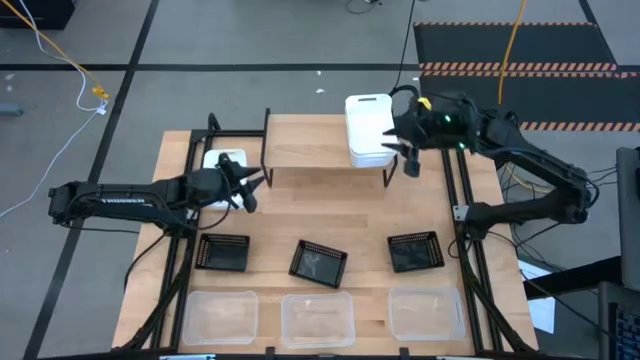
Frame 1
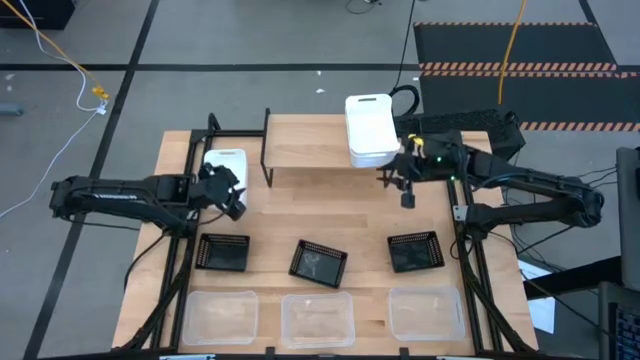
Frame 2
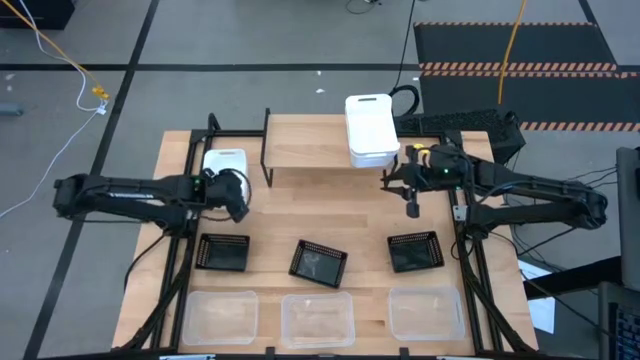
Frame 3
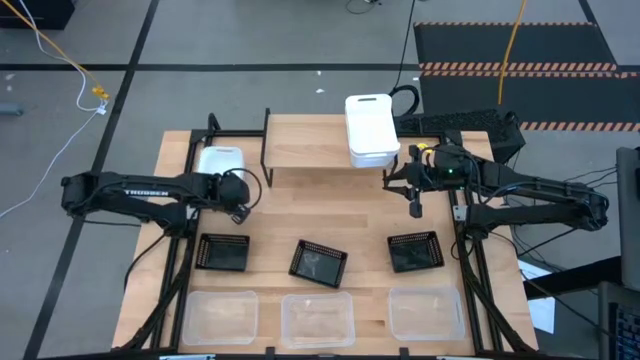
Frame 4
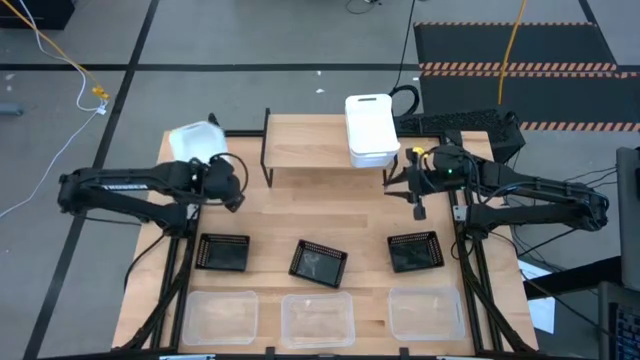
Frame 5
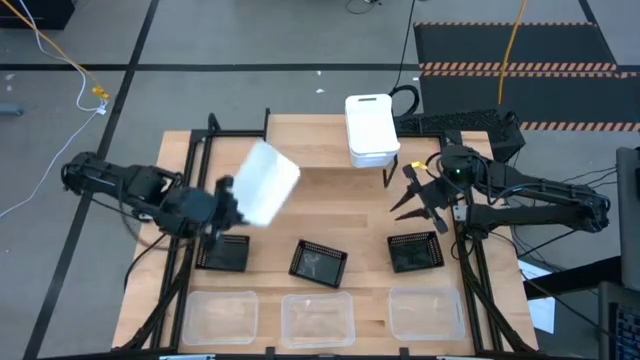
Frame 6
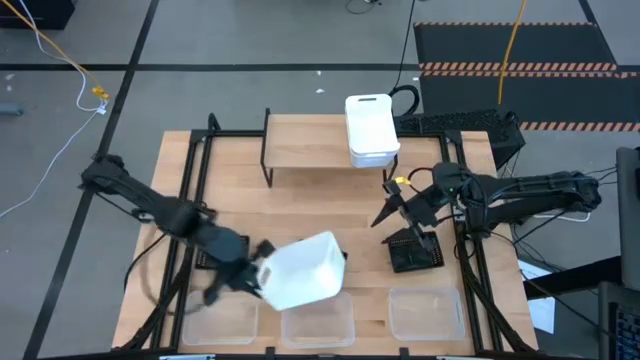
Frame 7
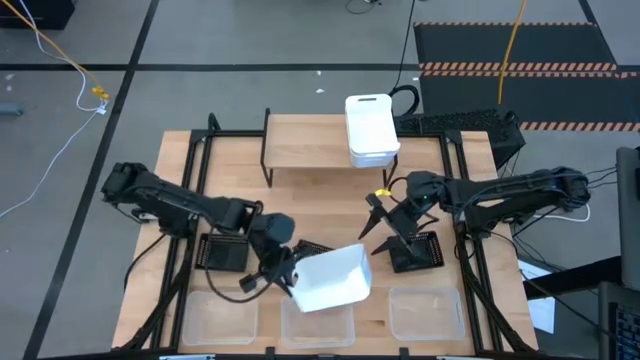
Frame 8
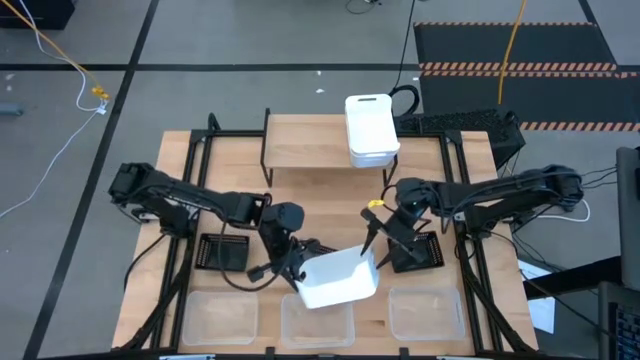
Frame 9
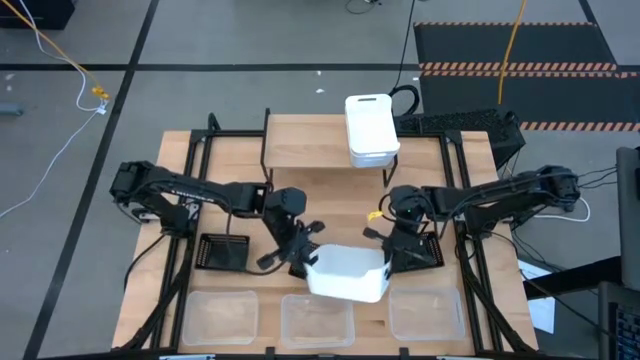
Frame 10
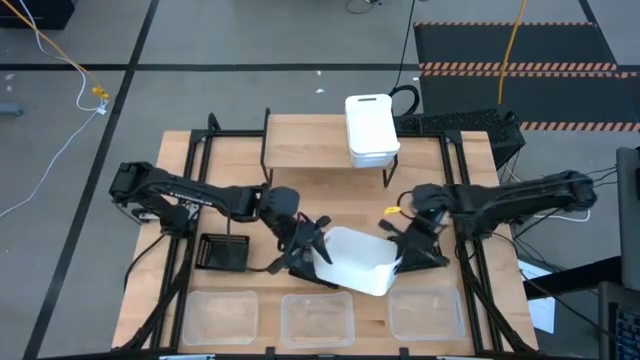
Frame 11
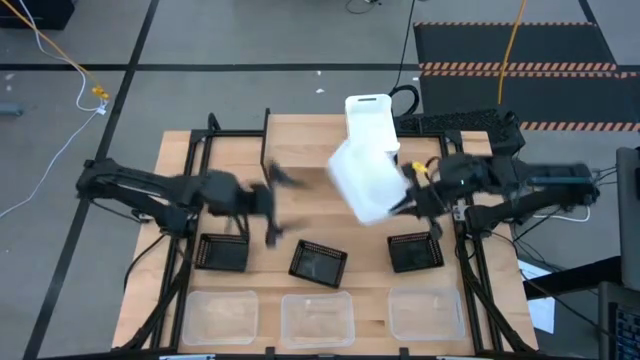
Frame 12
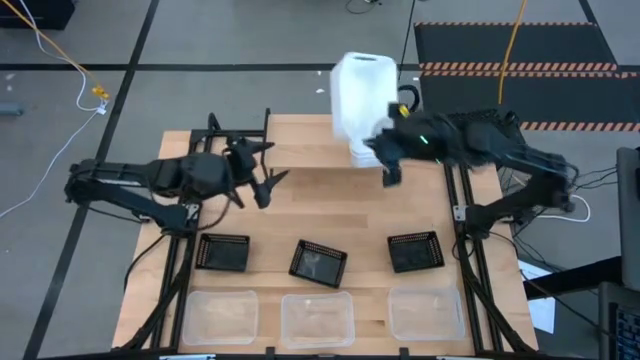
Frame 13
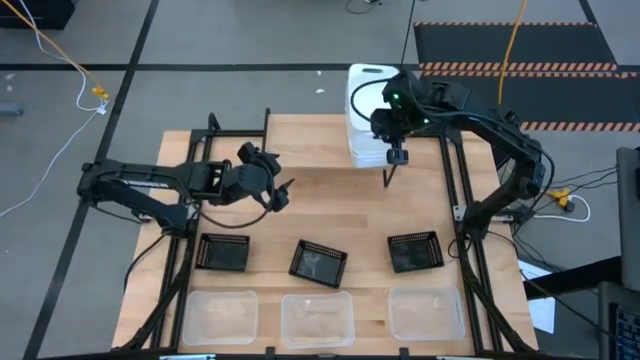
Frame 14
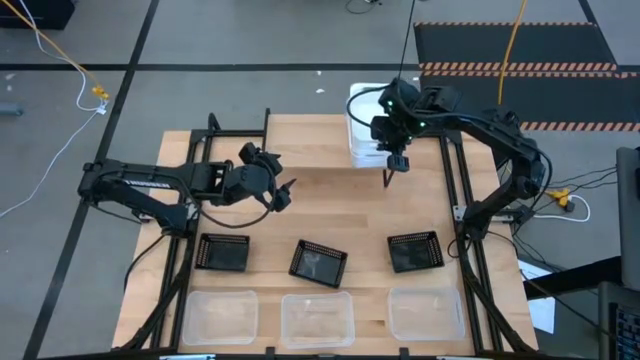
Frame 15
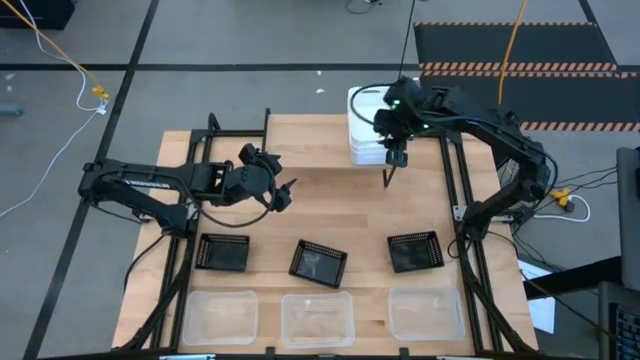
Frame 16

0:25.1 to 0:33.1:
Task: Stack baskets on shelf by color
Stack the white bin on top of the white bins on the shelf

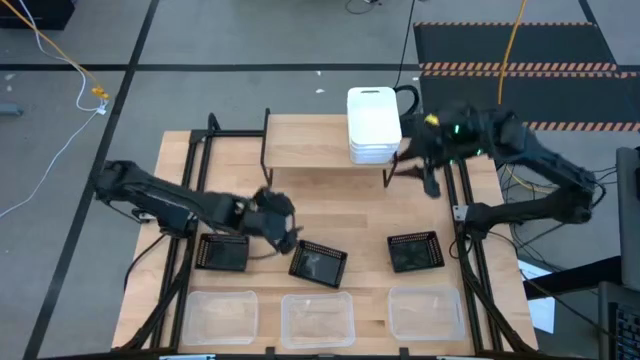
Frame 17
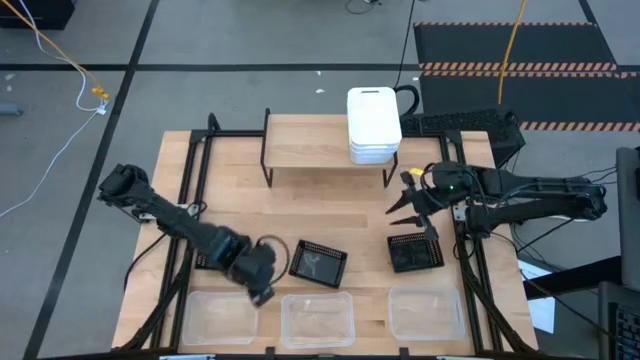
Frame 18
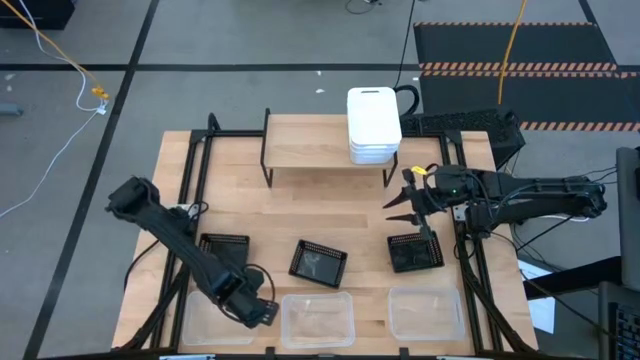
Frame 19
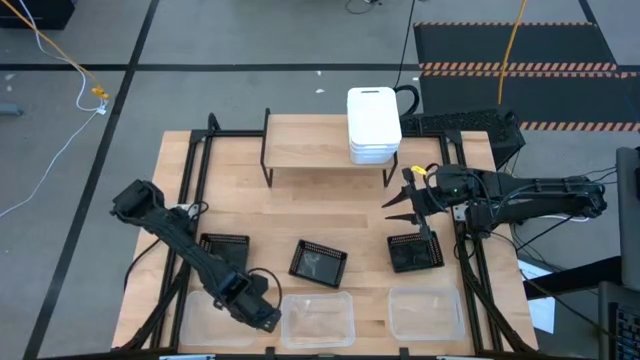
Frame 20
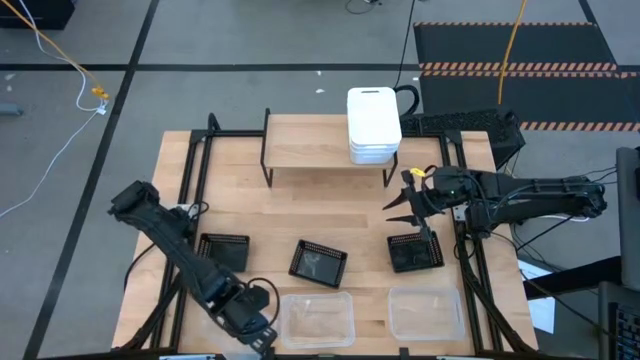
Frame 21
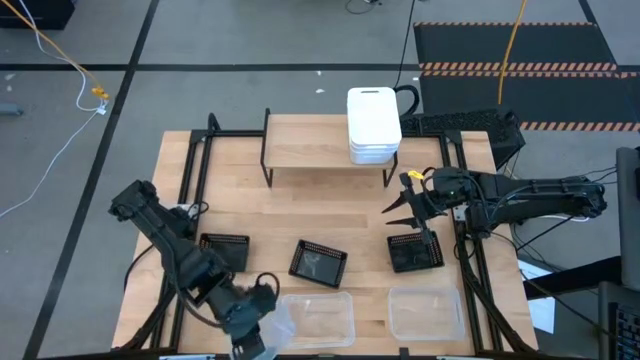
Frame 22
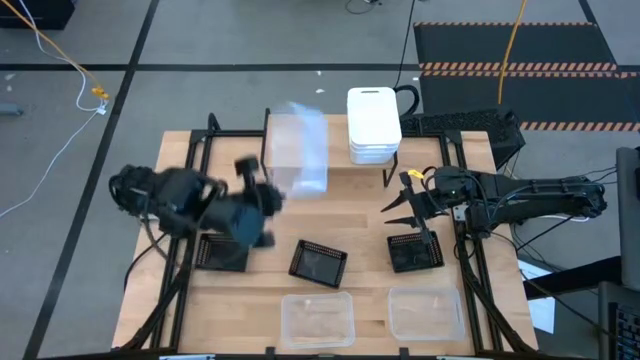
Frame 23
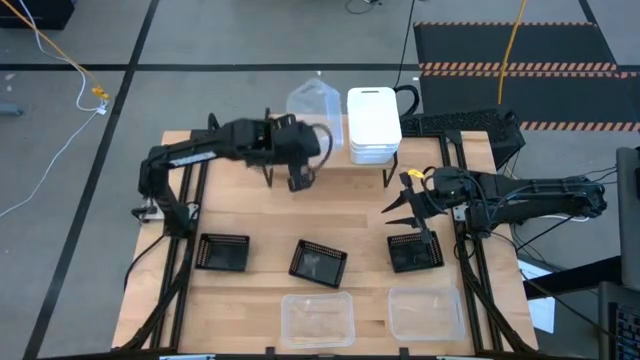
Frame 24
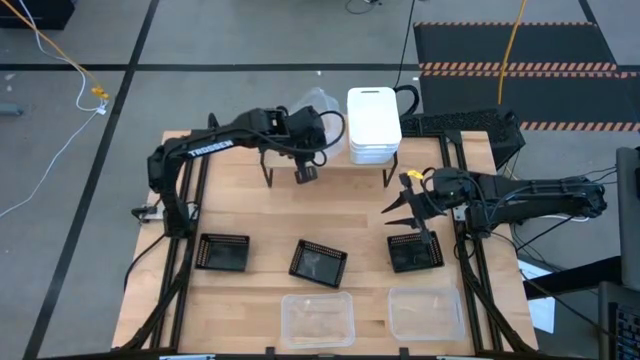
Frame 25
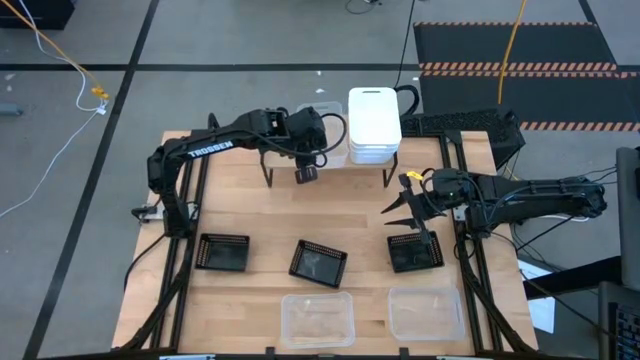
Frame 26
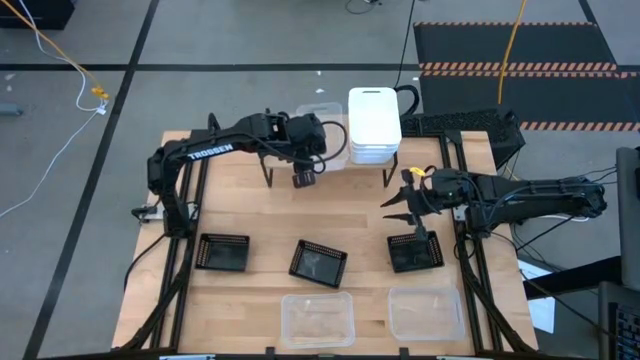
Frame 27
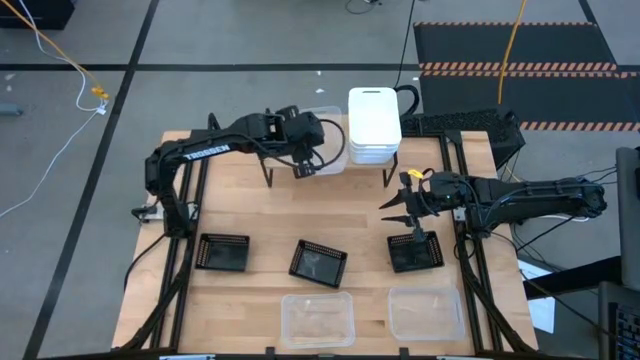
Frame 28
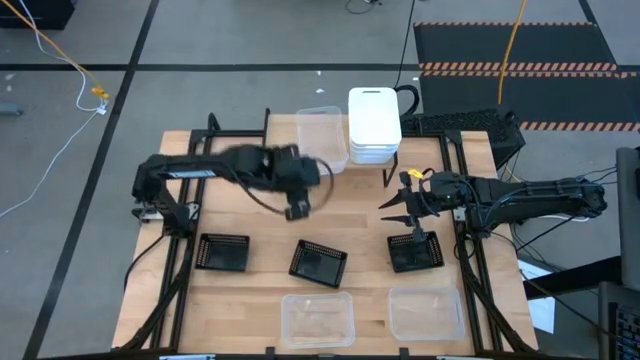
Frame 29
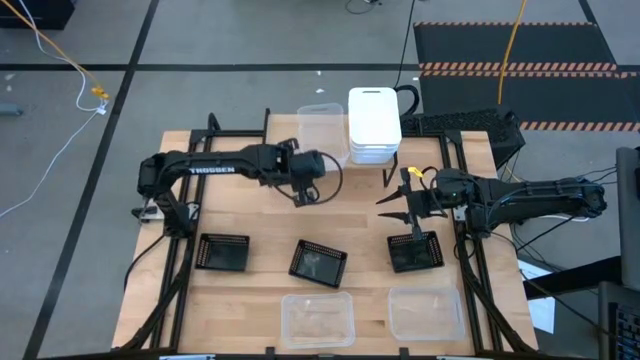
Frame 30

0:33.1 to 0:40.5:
Put the left transparent bin on the shelf

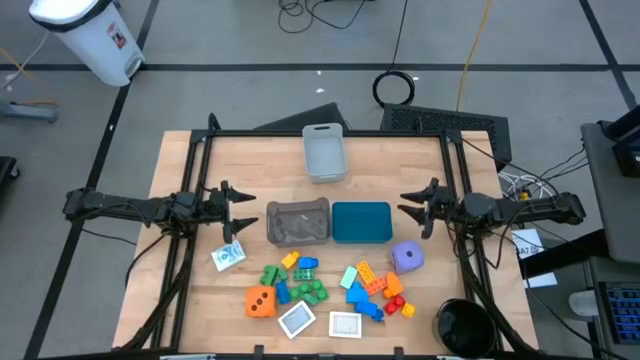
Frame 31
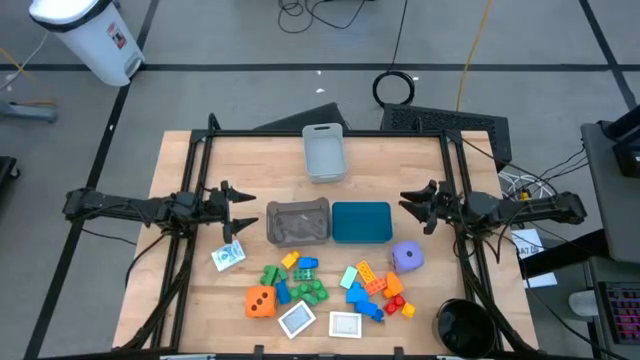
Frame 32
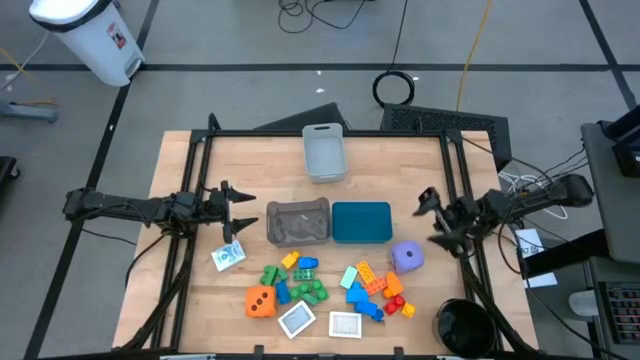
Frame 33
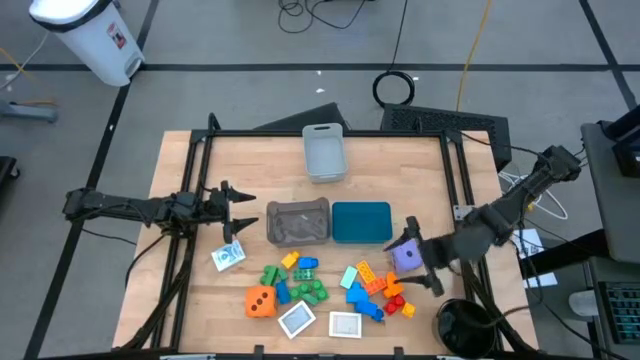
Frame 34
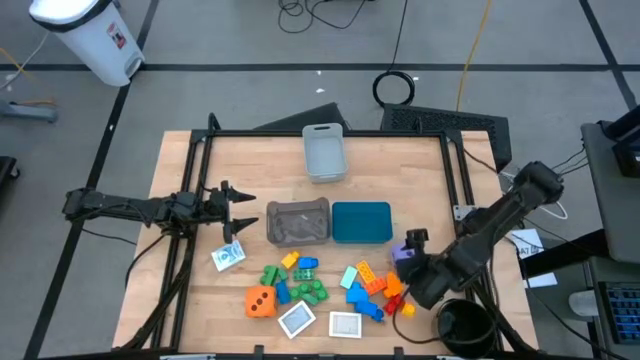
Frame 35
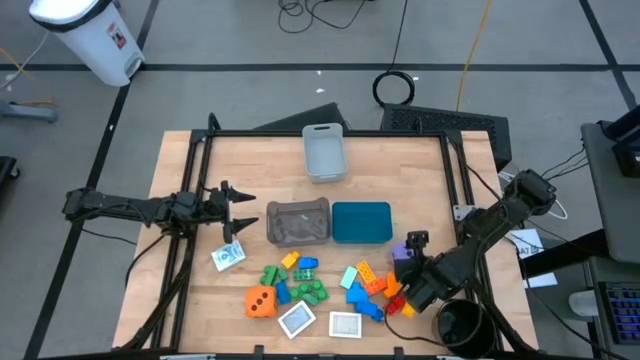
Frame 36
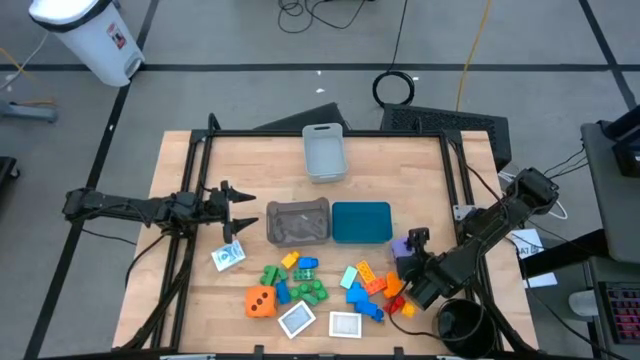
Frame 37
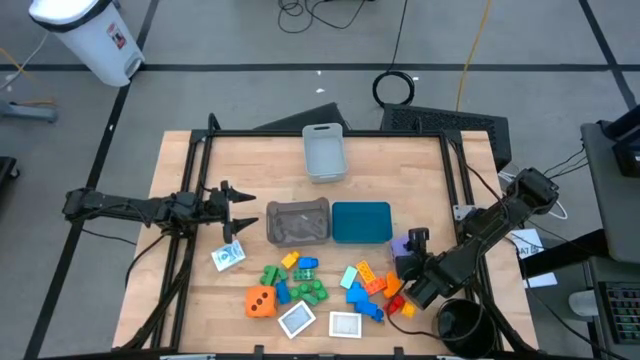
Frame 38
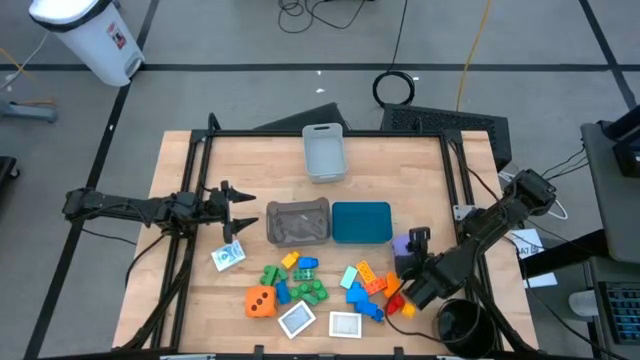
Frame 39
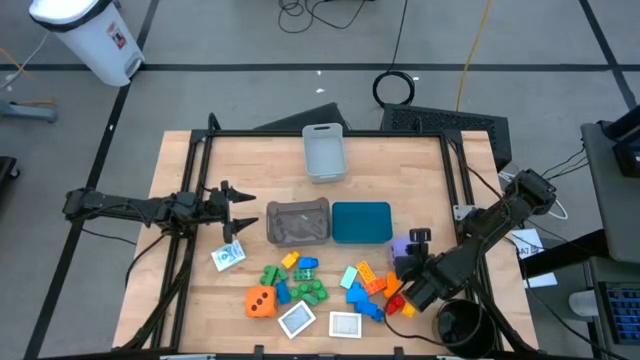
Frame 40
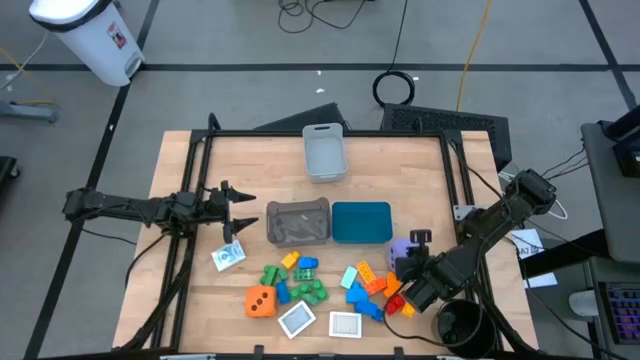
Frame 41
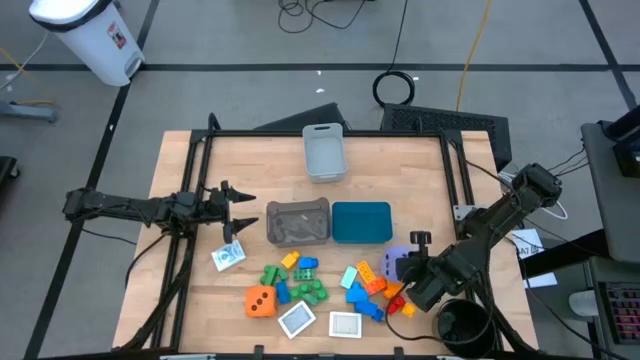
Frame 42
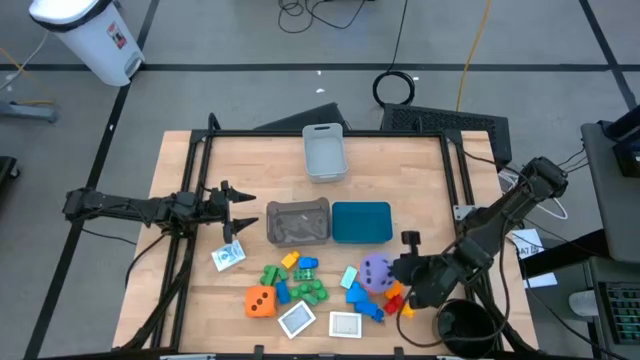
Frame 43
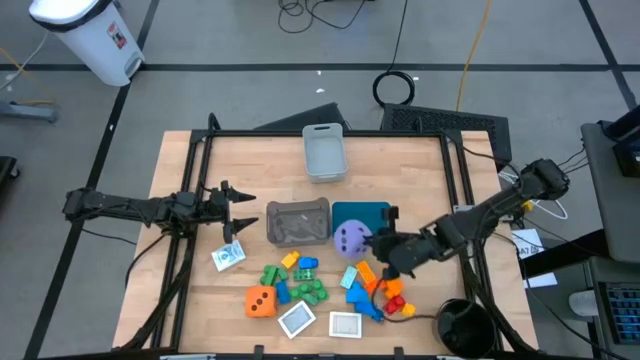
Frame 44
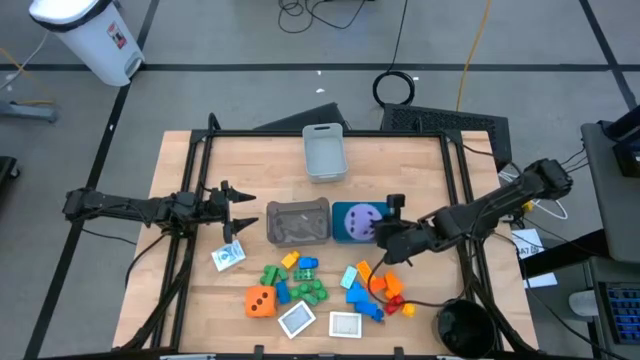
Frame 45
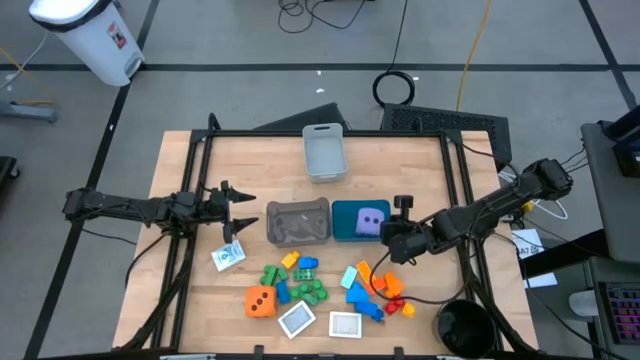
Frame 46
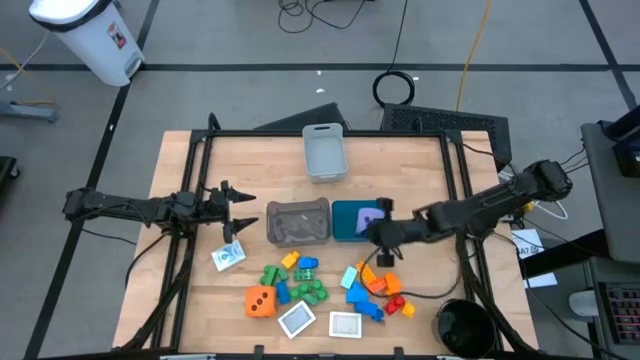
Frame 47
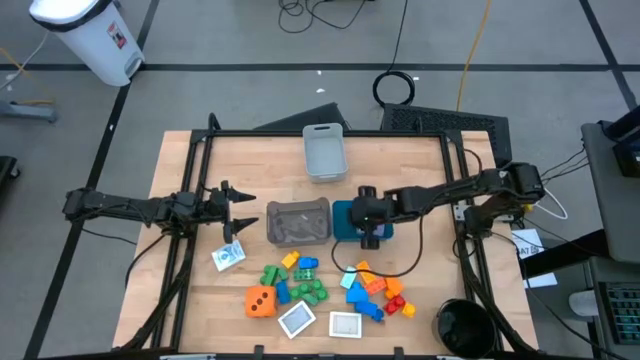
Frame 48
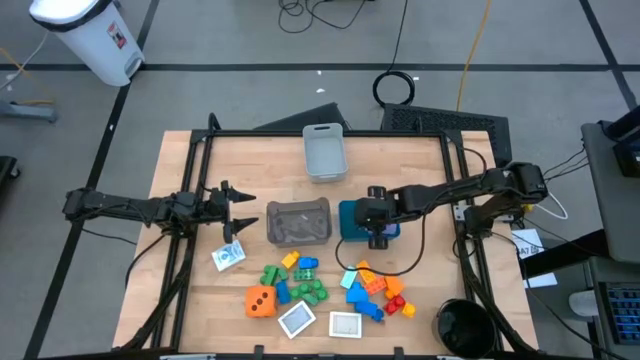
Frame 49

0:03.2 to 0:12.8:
Task: Pick & Place Toys
Put the purple dice into the blue bin
